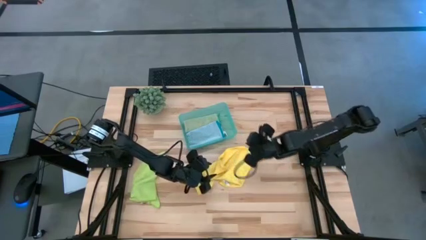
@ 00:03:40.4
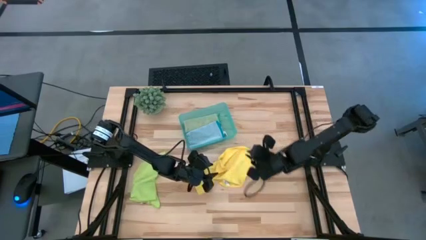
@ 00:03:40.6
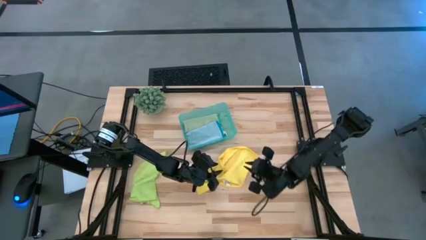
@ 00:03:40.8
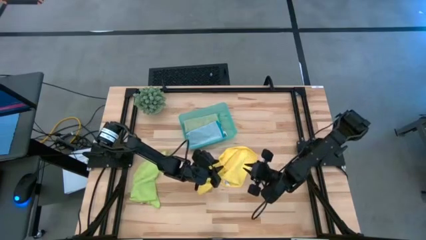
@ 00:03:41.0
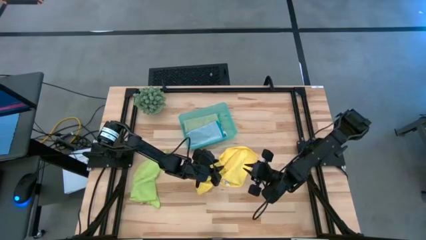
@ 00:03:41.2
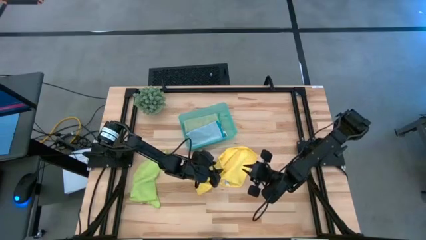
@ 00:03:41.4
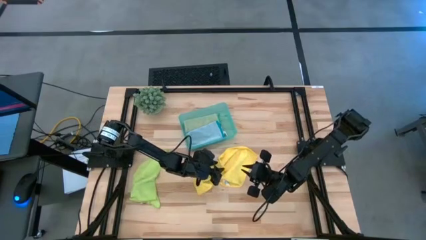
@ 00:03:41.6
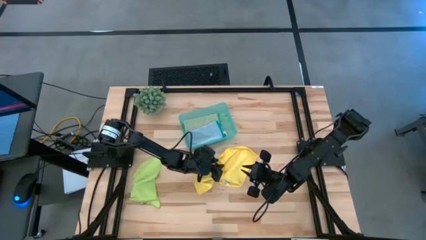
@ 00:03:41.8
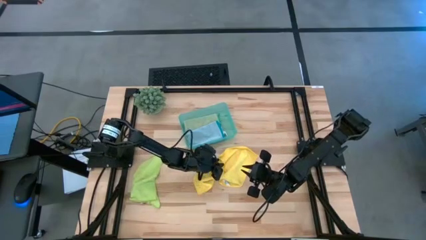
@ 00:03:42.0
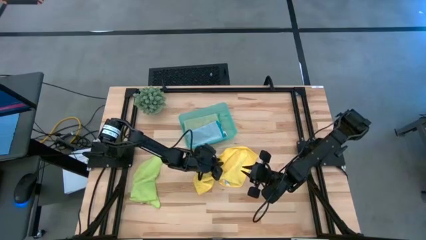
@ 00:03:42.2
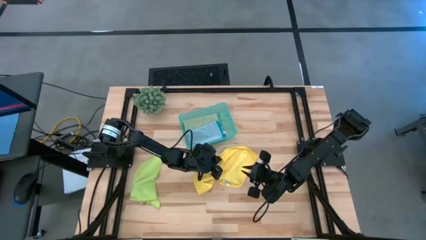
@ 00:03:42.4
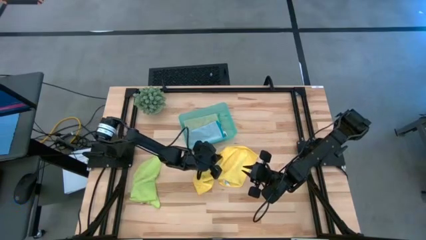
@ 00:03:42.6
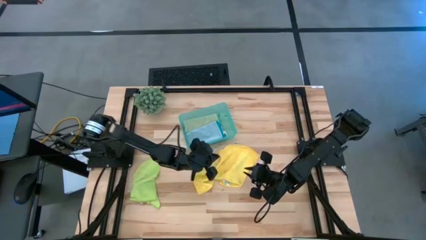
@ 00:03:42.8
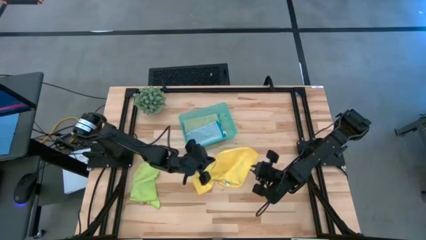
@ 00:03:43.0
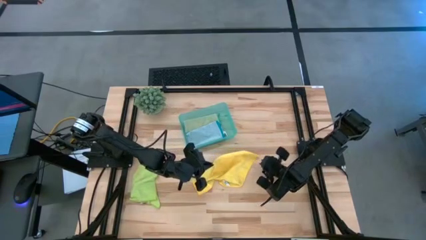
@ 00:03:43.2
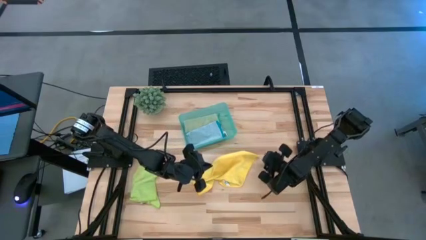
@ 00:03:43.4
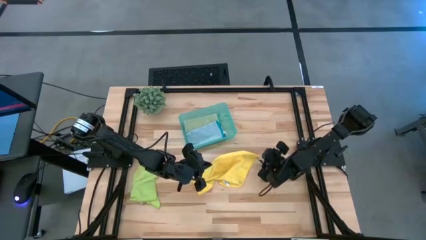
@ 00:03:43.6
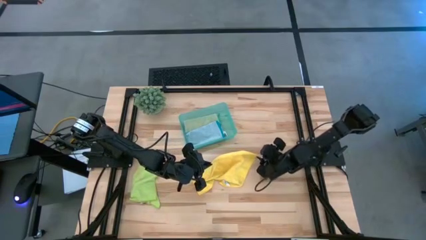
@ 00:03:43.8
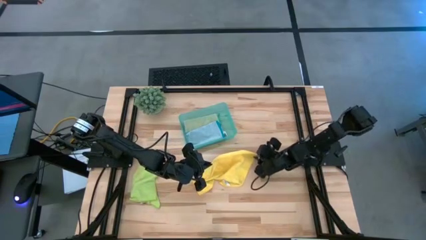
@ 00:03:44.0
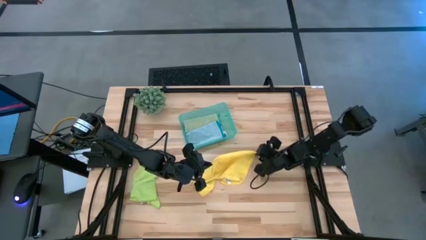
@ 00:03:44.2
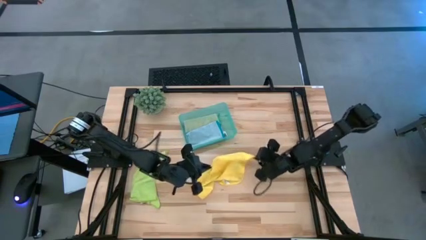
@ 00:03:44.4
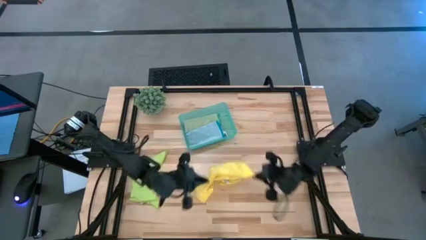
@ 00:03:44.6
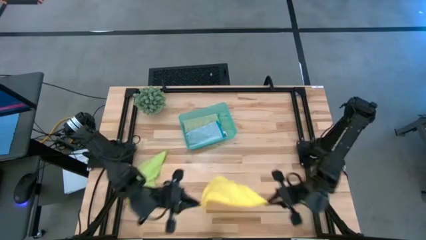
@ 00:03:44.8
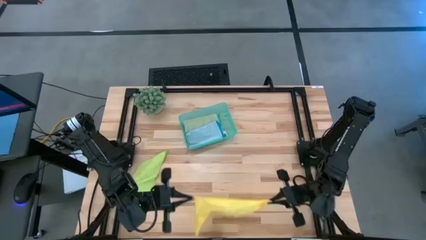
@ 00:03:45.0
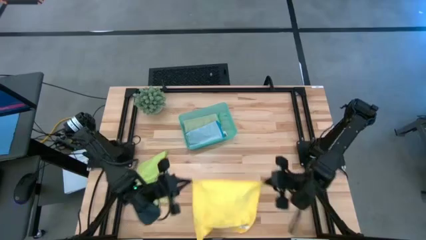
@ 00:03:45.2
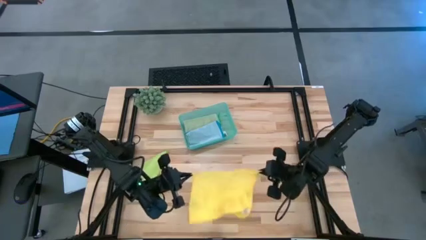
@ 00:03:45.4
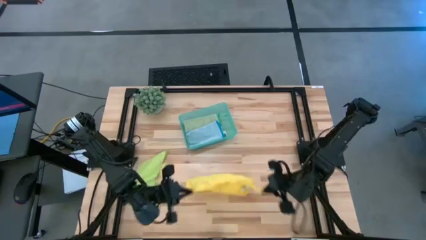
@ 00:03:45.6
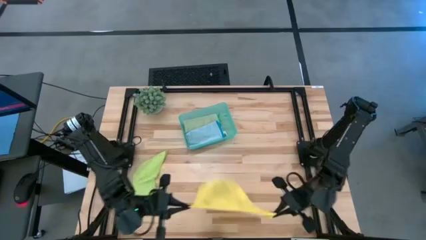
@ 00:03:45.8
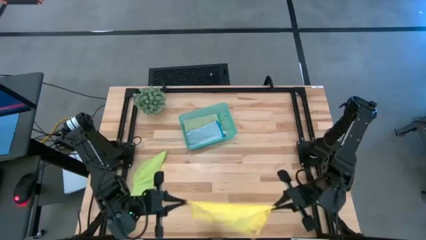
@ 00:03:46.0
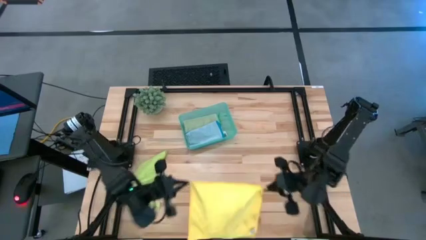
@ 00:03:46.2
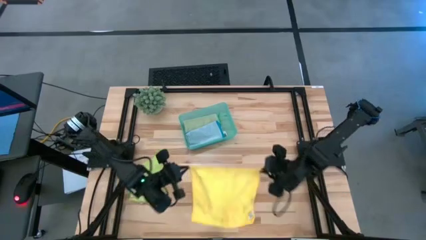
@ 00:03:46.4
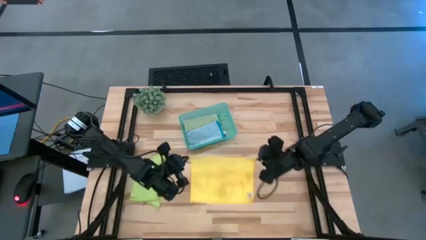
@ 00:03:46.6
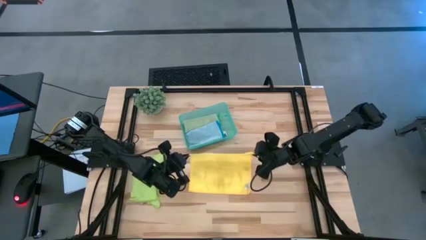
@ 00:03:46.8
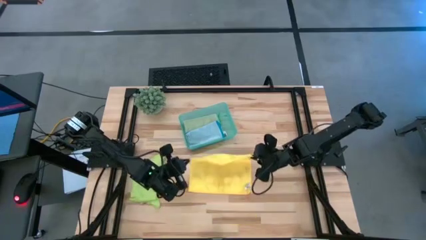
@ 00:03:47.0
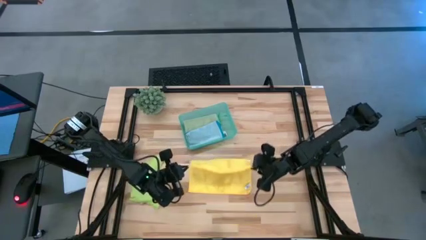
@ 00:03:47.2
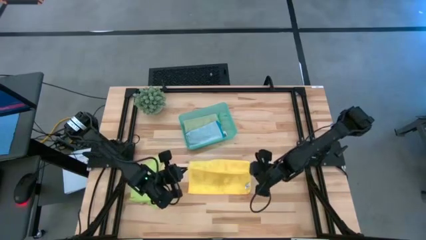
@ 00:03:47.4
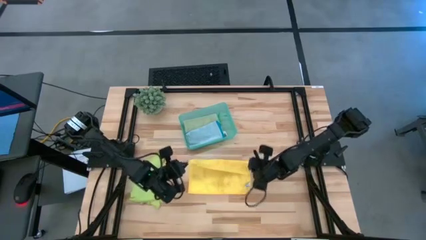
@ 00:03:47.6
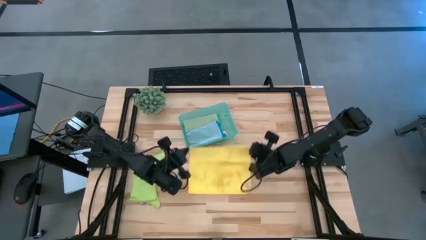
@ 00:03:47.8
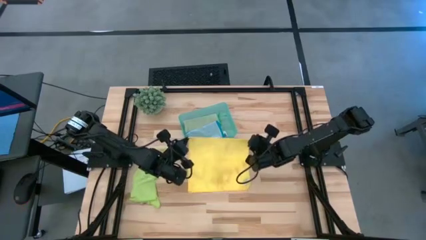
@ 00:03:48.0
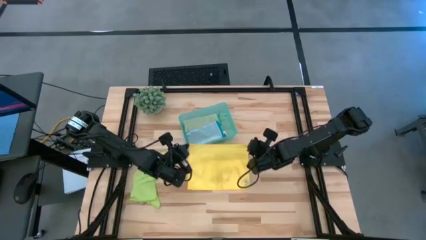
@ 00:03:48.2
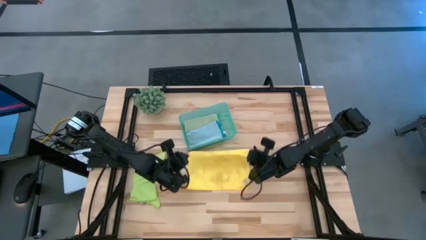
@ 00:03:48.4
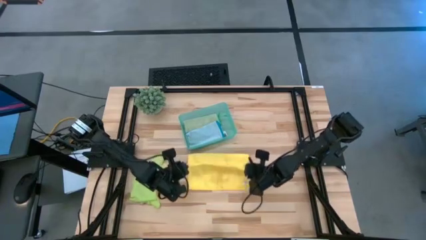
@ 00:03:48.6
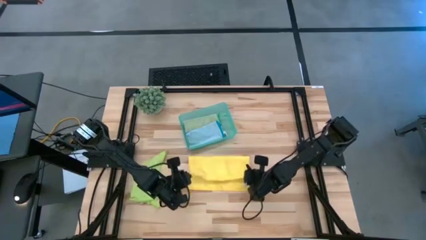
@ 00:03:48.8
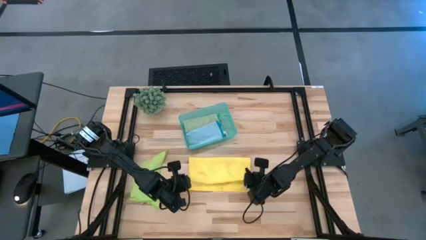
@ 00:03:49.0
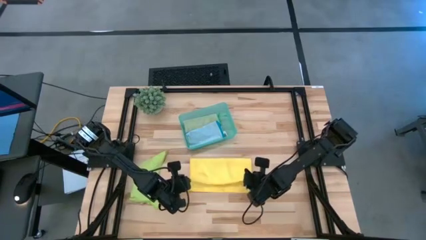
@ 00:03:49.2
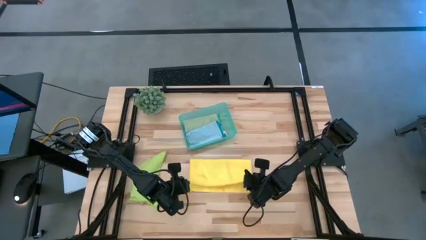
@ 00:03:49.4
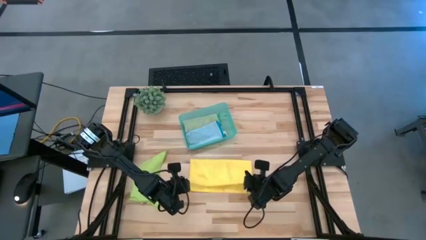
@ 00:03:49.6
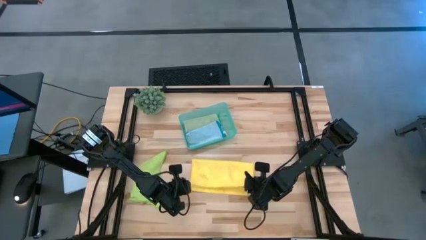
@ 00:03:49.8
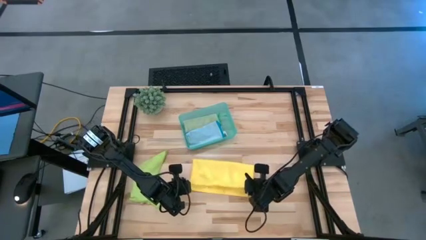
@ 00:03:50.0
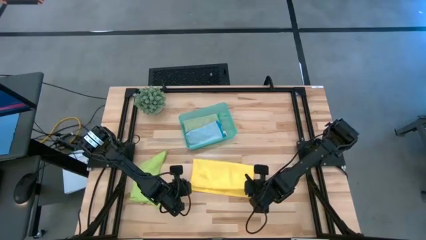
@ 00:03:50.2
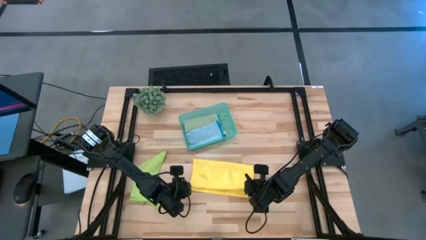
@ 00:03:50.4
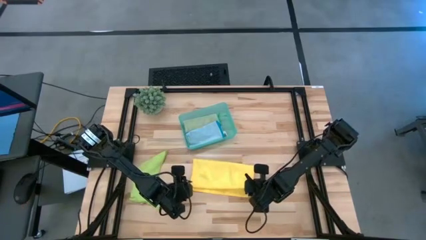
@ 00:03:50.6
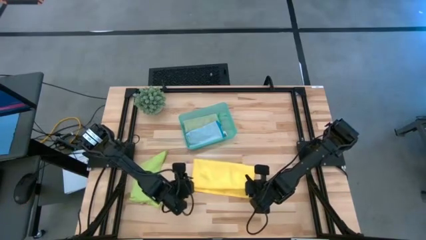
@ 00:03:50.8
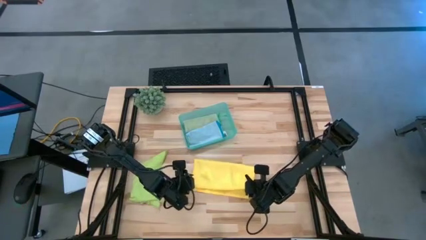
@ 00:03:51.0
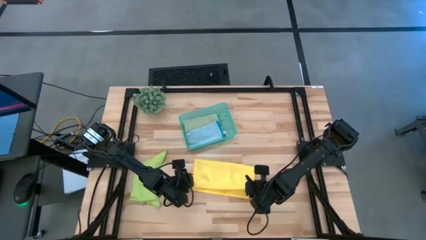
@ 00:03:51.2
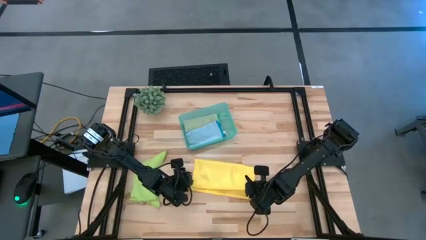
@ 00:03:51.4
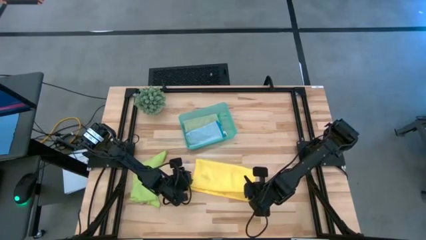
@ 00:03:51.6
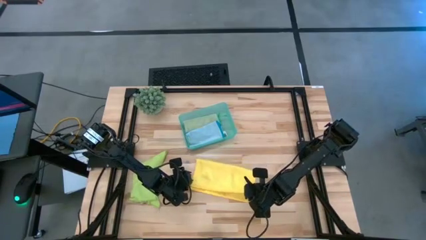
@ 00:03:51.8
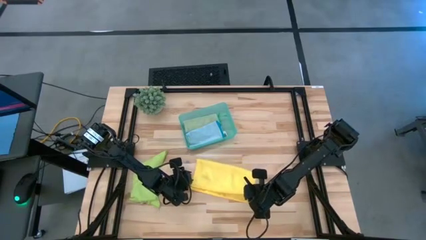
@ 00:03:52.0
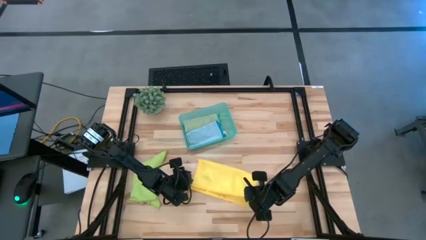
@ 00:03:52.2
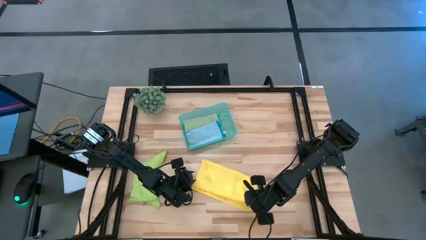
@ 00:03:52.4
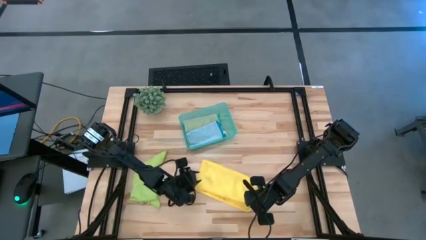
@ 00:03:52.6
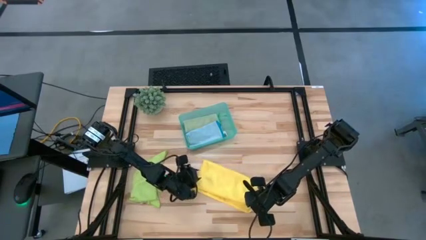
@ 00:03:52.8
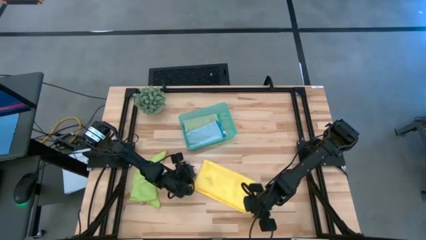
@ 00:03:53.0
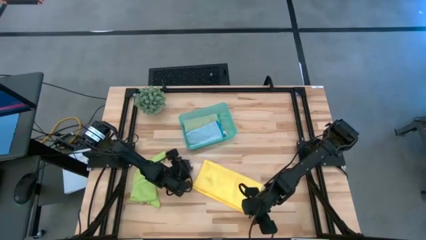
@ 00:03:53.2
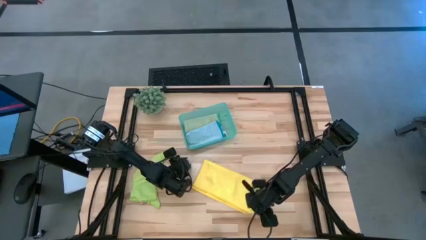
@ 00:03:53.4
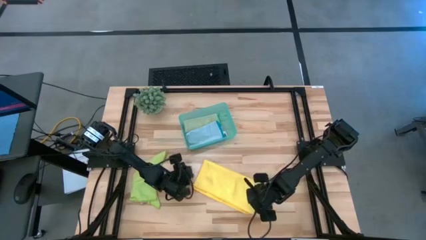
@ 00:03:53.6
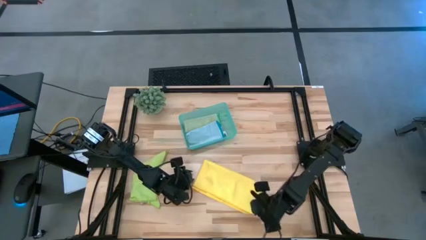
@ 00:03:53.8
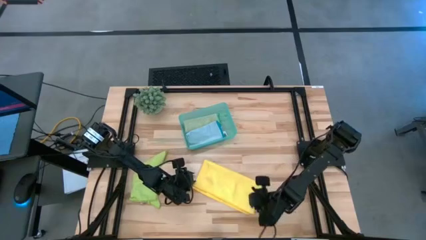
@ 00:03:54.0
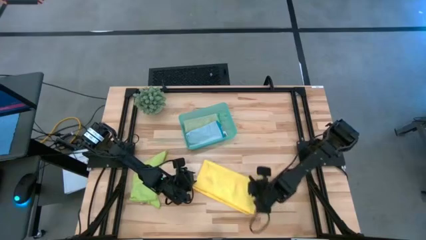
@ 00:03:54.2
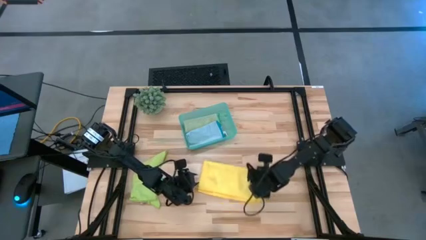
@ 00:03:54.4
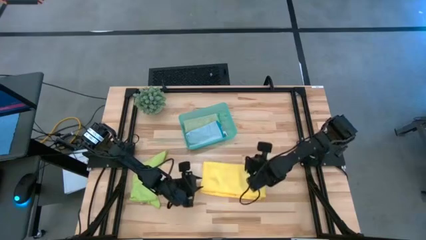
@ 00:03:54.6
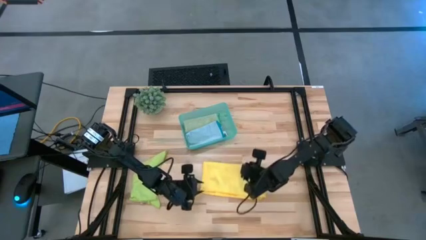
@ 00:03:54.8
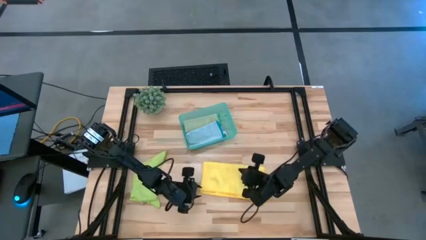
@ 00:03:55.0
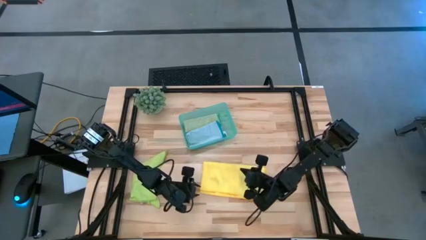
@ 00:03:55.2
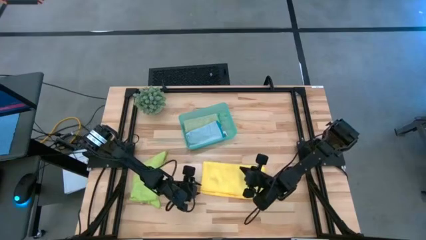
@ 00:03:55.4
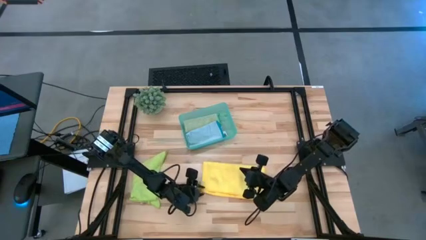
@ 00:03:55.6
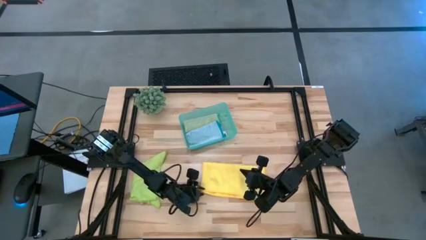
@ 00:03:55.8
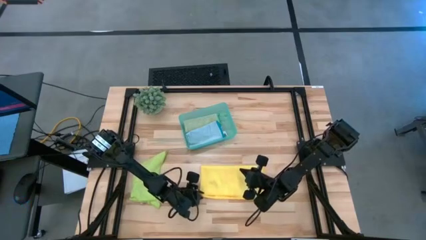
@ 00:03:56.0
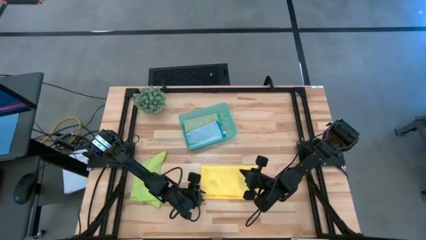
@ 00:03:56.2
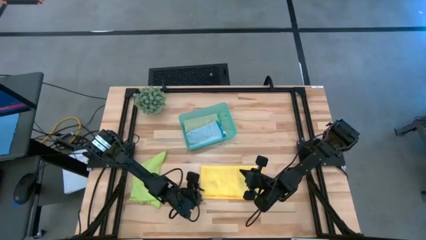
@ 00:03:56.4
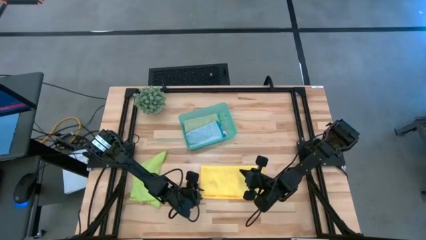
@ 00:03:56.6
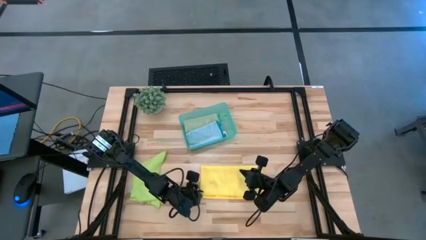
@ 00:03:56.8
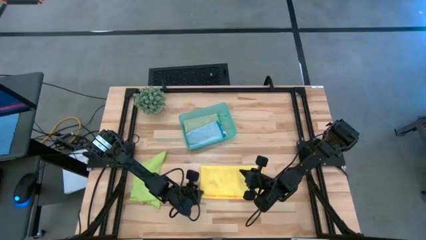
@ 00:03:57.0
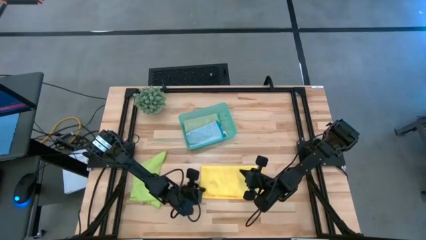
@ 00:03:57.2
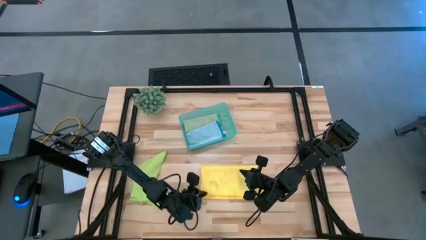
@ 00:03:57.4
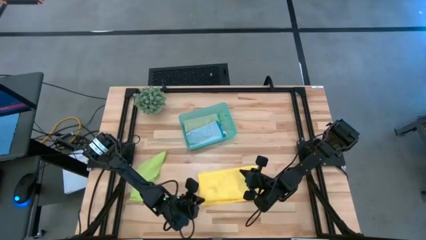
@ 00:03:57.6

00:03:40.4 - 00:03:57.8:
Task: Fold microfiber towels
Fold the yellow towel
